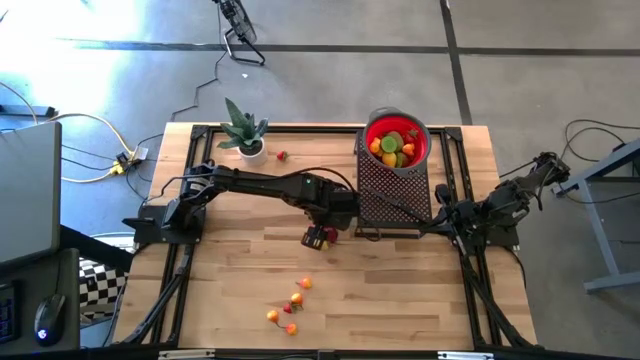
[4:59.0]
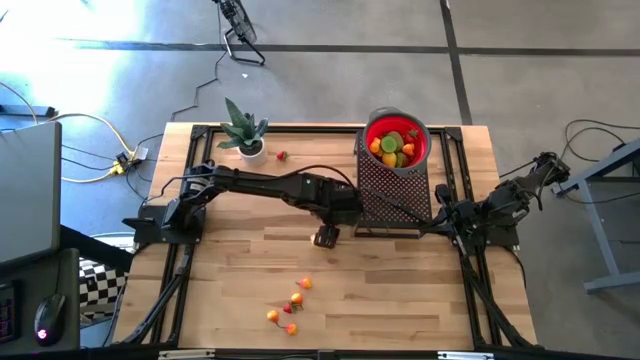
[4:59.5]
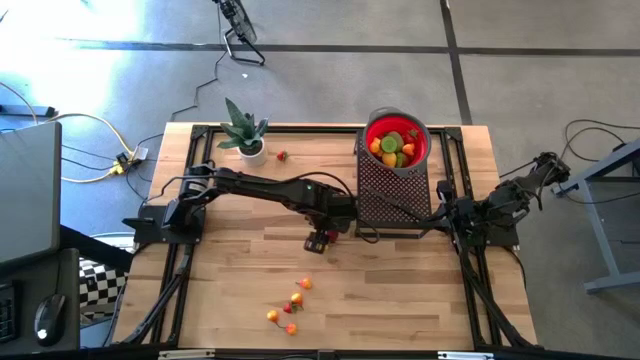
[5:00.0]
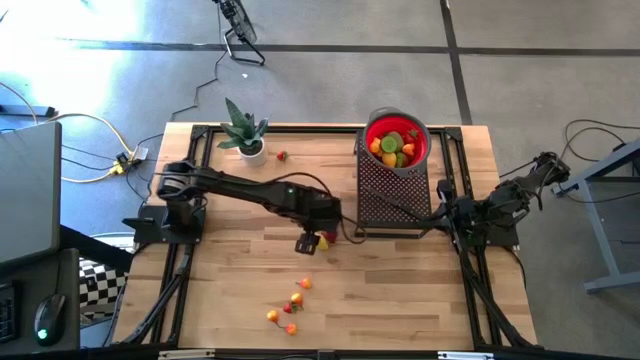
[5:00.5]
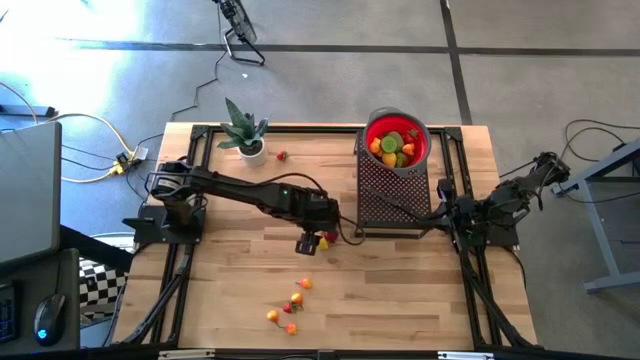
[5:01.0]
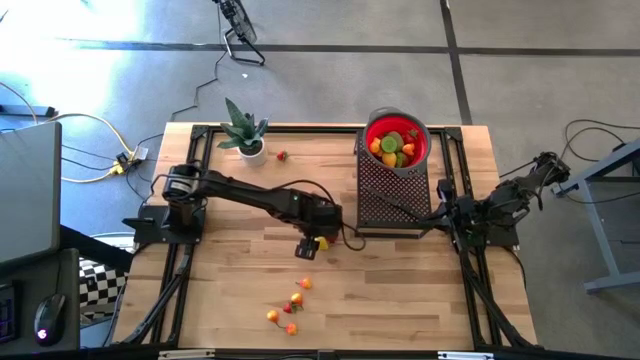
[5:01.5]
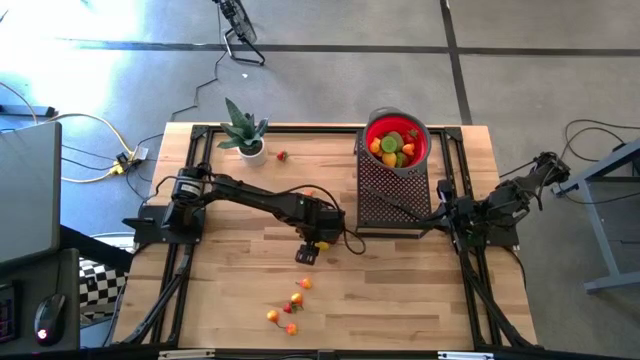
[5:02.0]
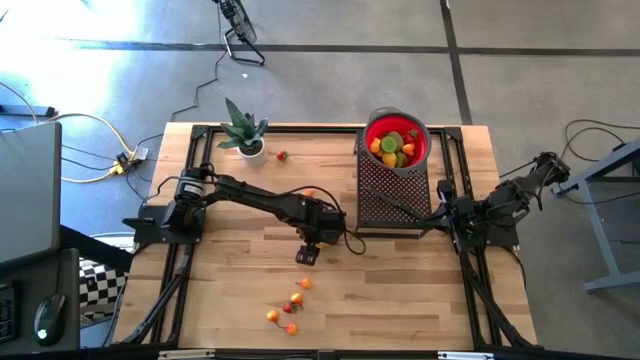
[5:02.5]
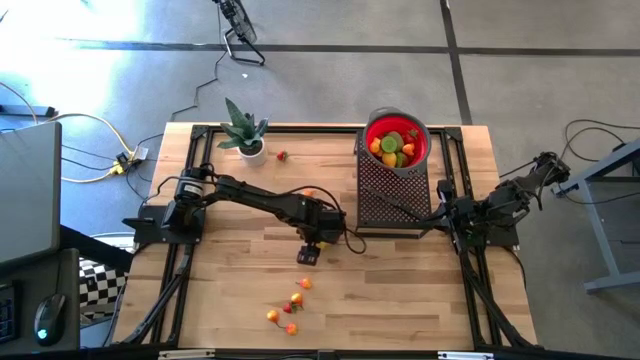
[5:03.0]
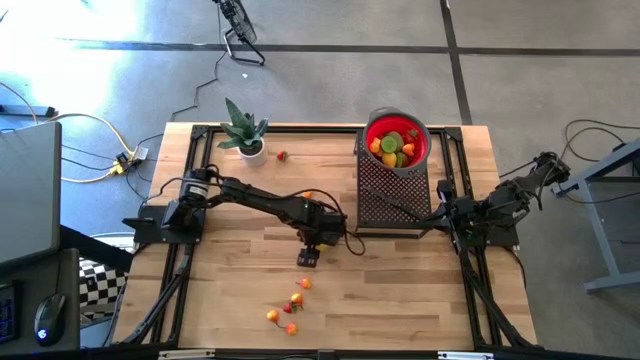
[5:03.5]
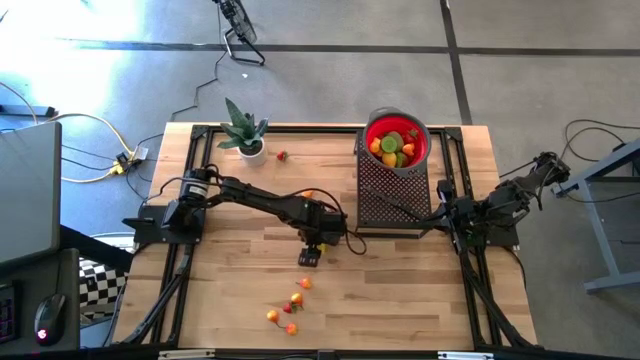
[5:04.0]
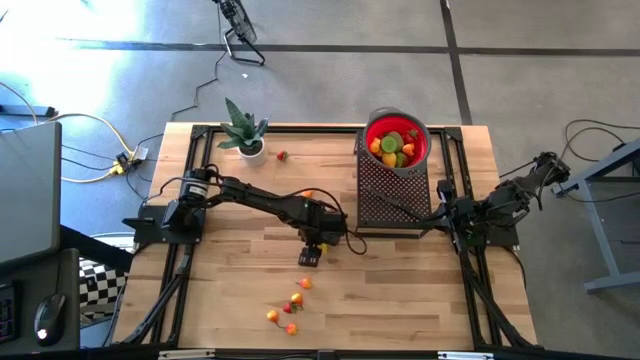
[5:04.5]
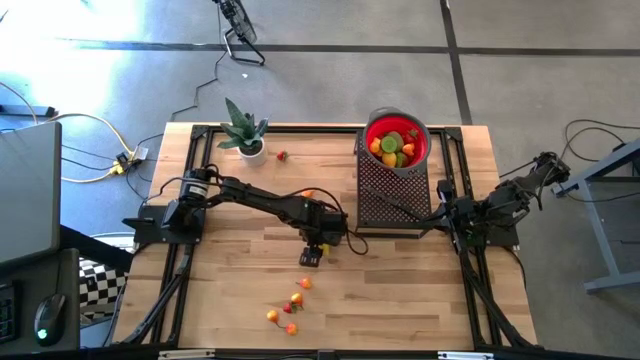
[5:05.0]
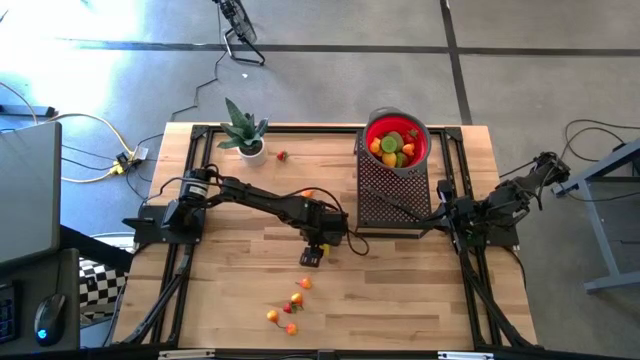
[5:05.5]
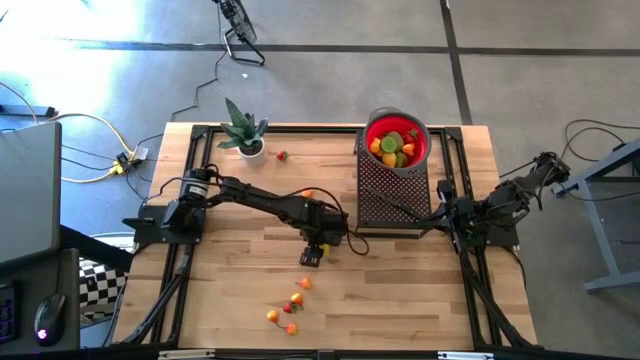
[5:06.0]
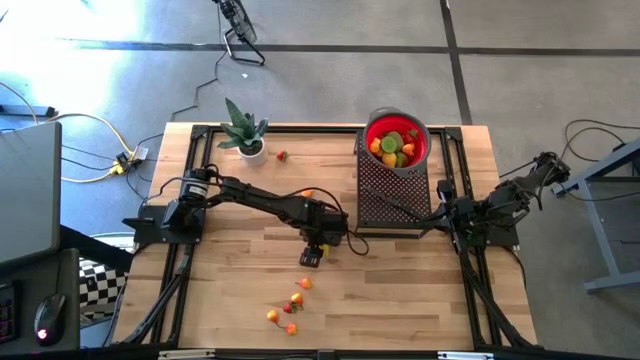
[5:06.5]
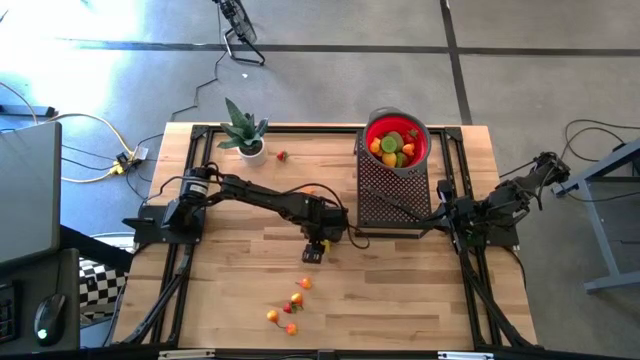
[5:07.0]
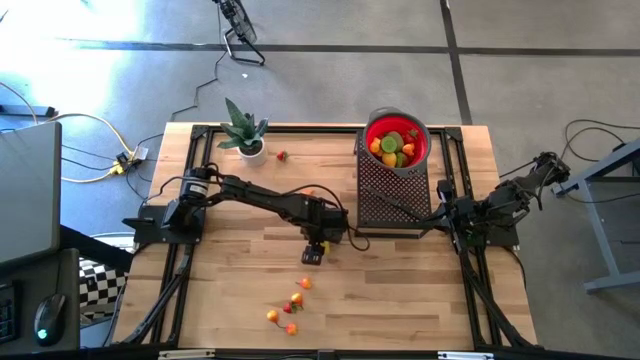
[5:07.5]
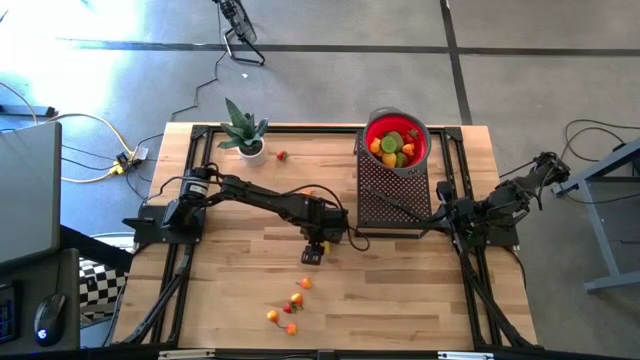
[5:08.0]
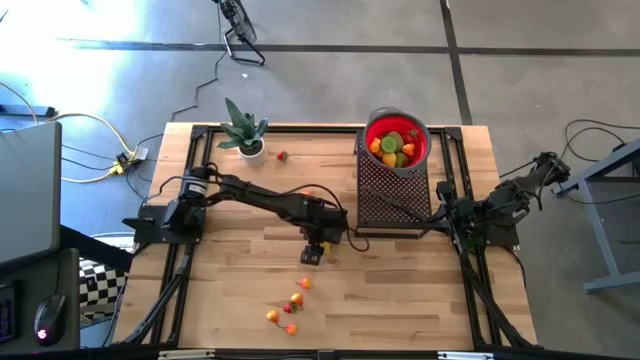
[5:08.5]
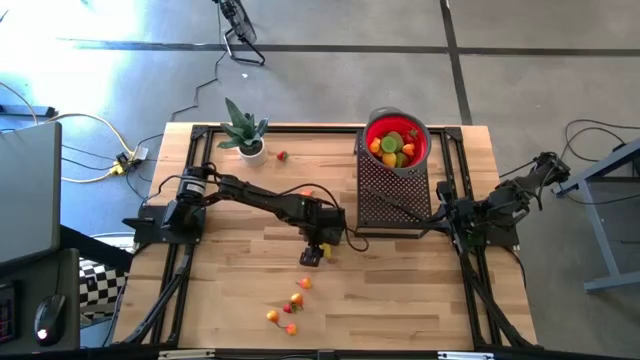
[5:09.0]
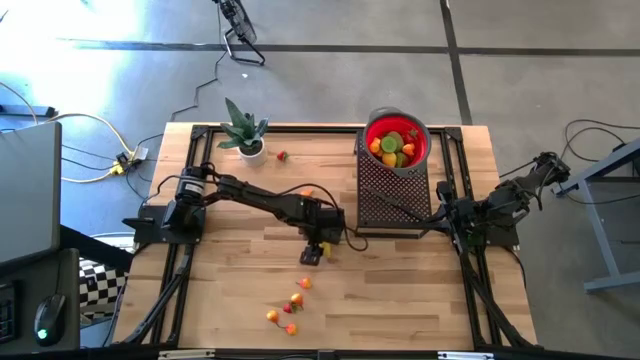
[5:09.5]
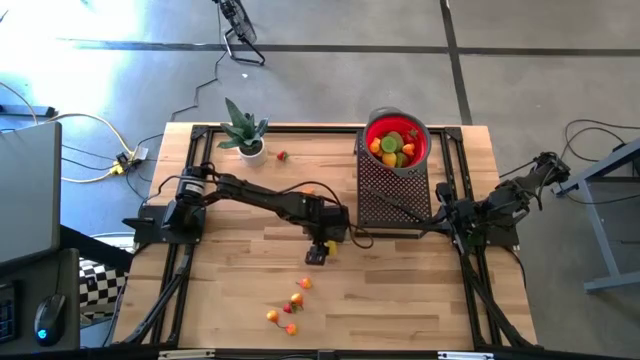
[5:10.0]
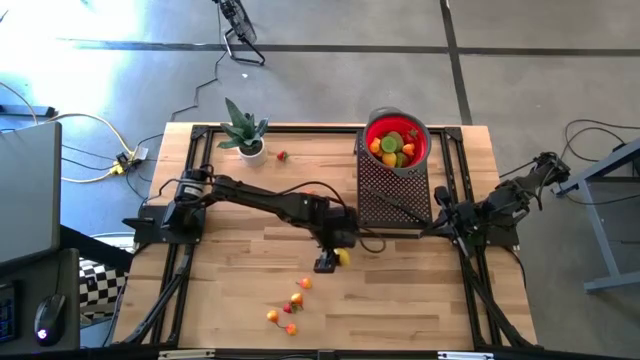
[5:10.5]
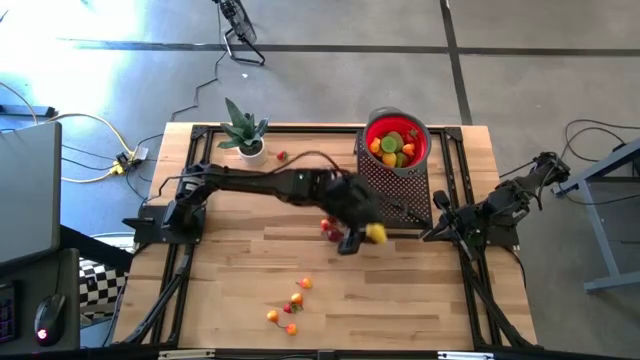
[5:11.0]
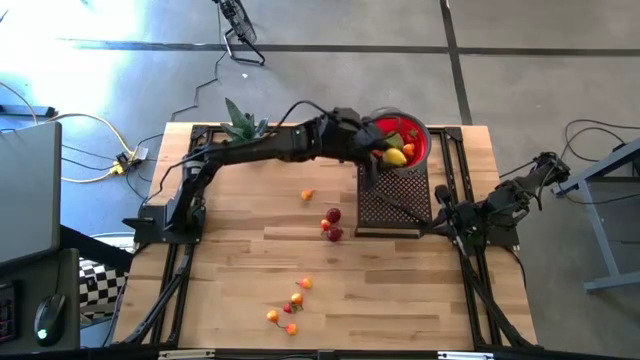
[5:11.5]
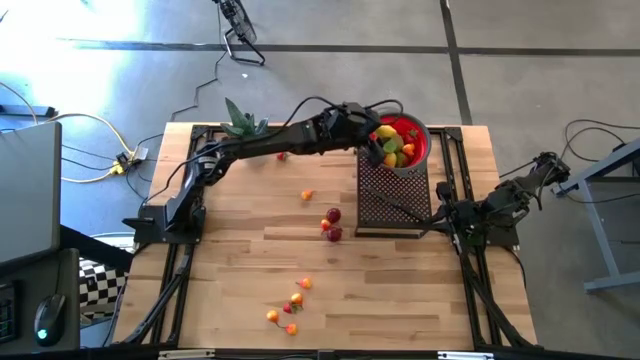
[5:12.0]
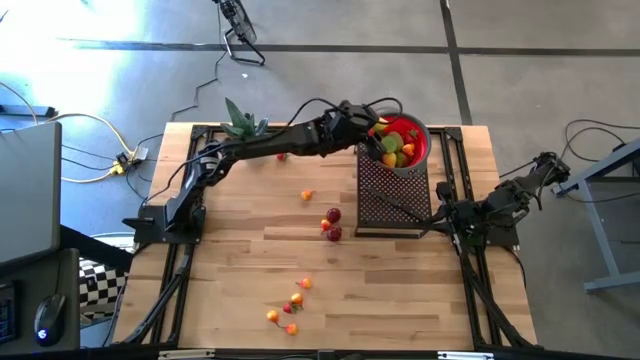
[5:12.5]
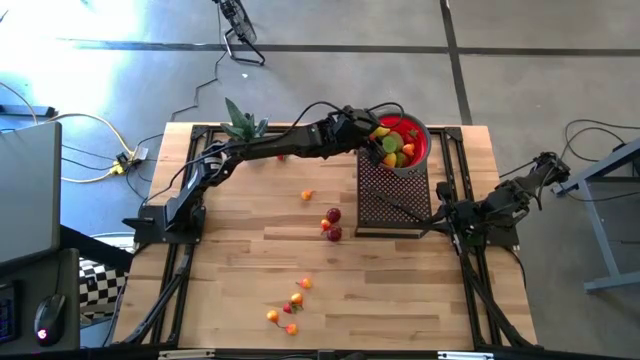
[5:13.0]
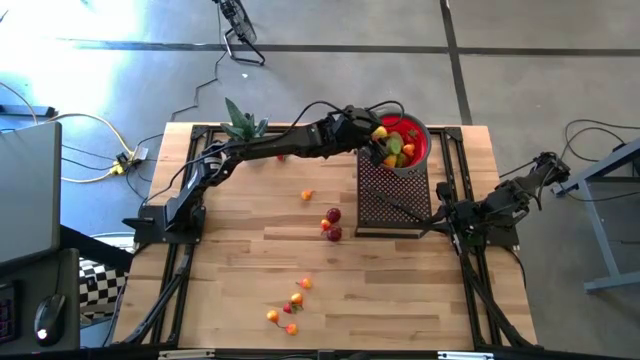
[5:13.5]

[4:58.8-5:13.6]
Task: Pick & Place Fruit
Put the lemon into the strainer bowl on the shelf

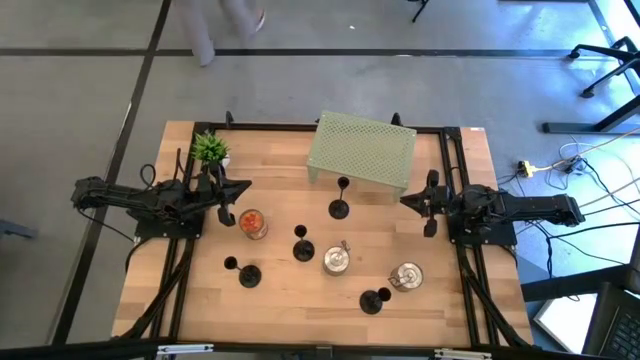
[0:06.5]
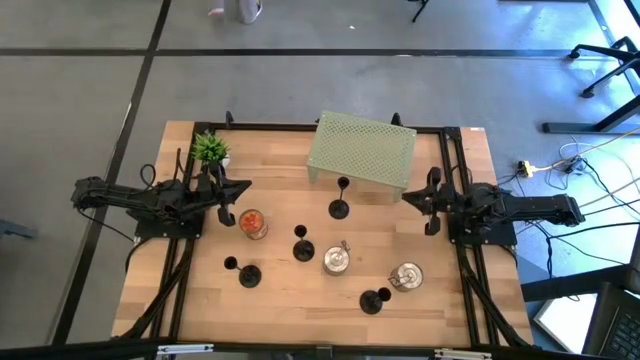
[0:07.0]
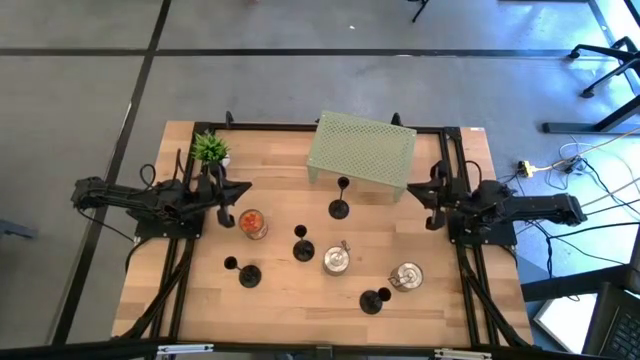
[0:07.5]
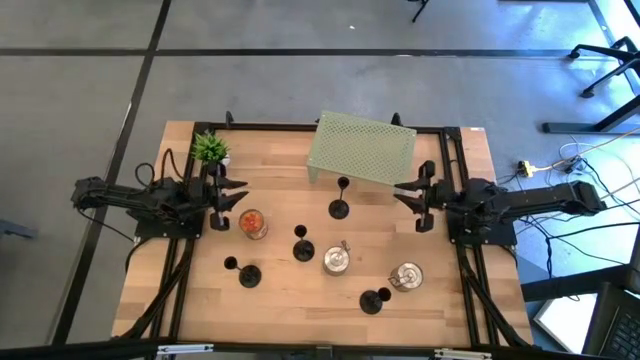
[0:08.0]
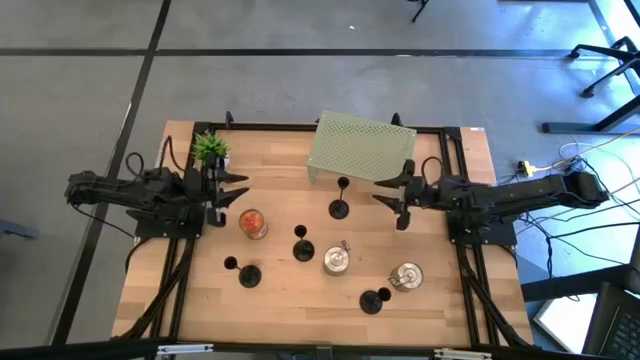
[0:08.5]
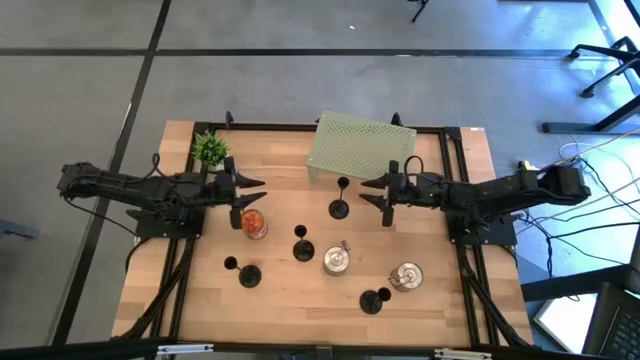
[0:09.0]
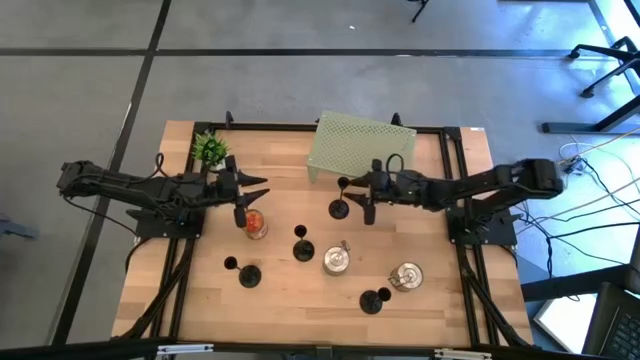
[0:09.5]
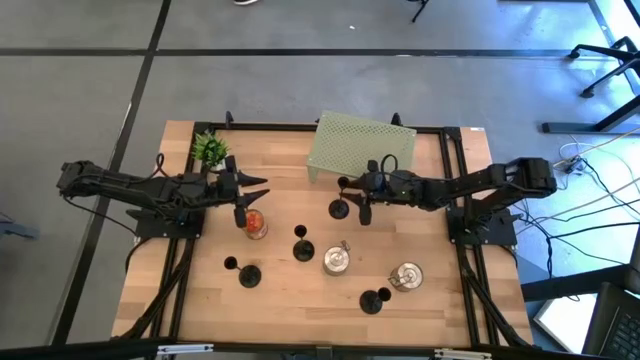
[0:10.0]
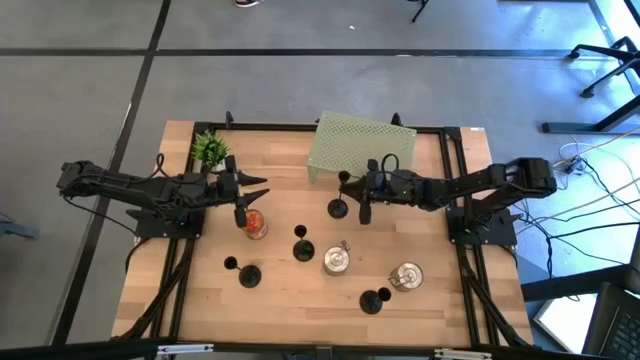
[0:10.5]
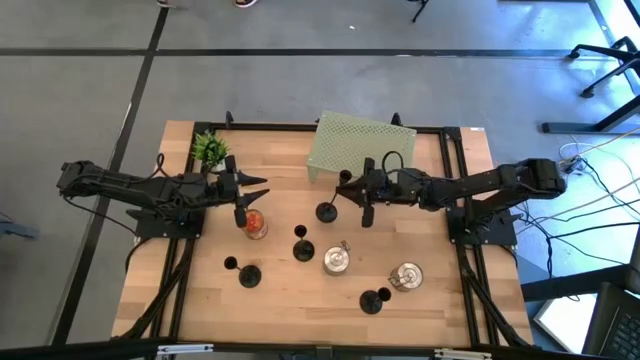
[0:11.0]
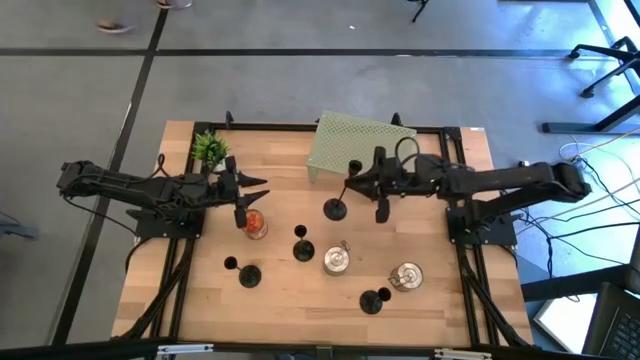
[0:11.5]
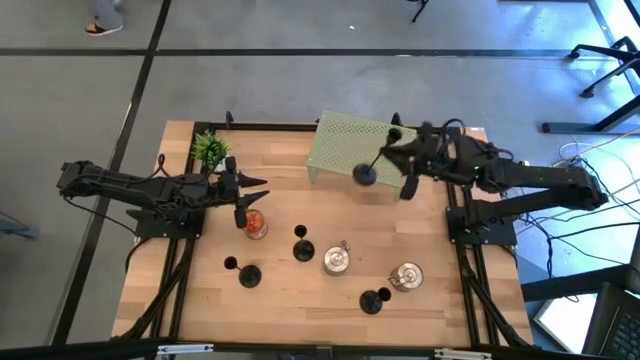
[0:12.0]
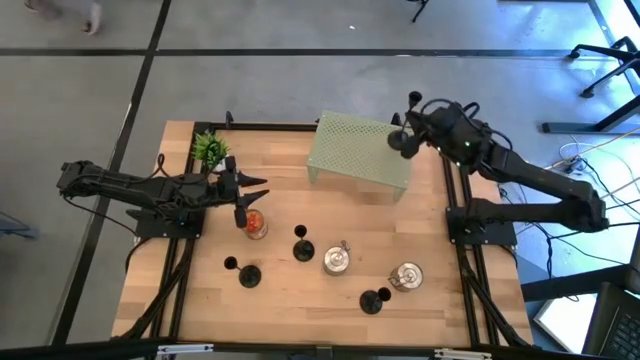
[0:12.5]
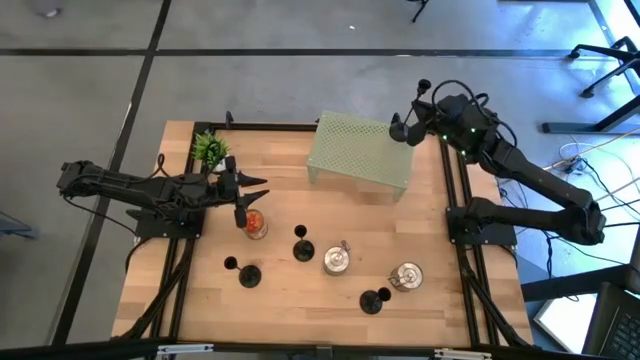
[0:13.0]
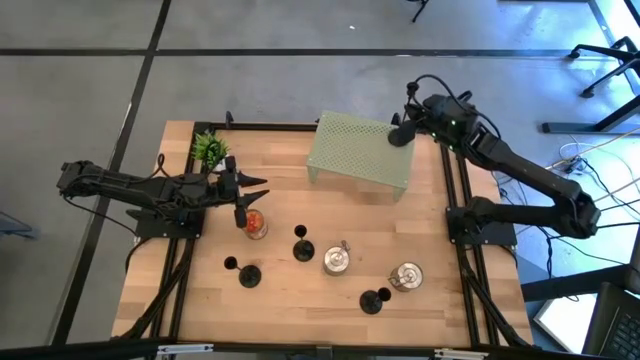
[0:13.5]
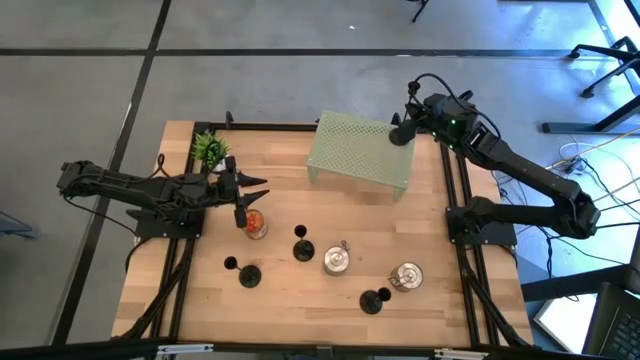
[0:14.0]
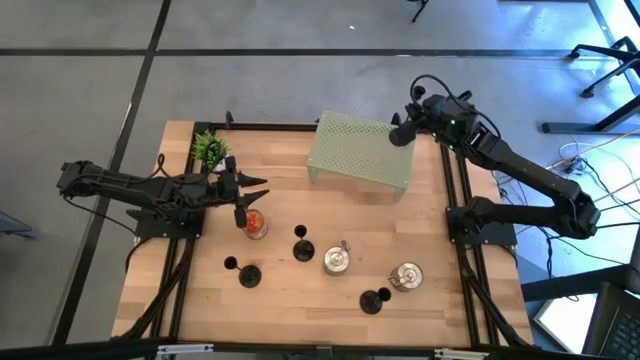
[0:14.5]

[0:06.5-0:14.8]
Task: Pick & Place candle stick holders
Put the black candle holder on the shelf
